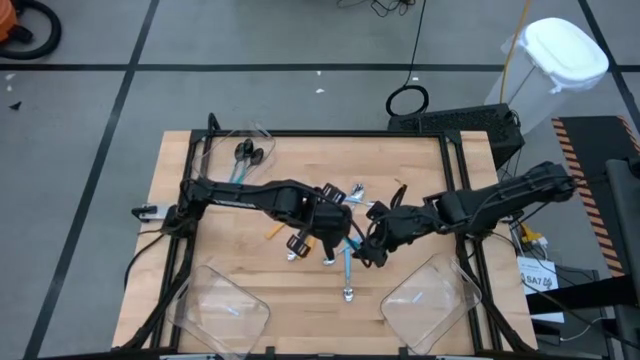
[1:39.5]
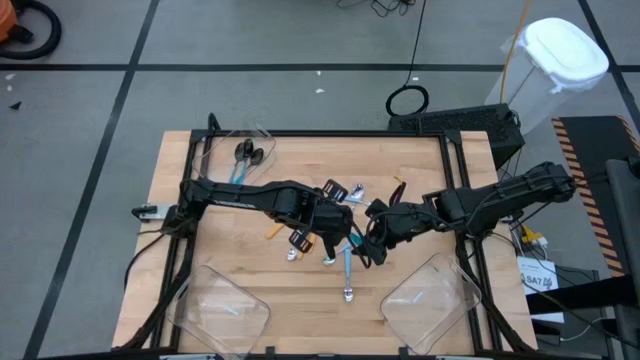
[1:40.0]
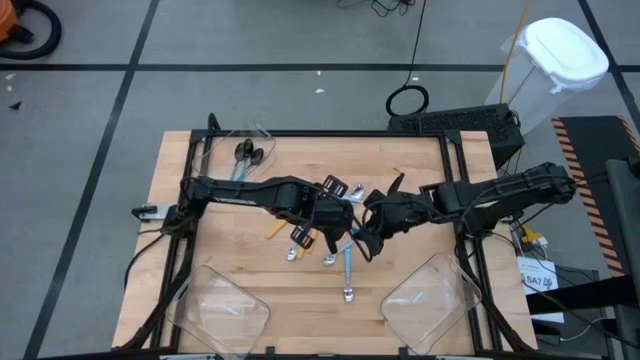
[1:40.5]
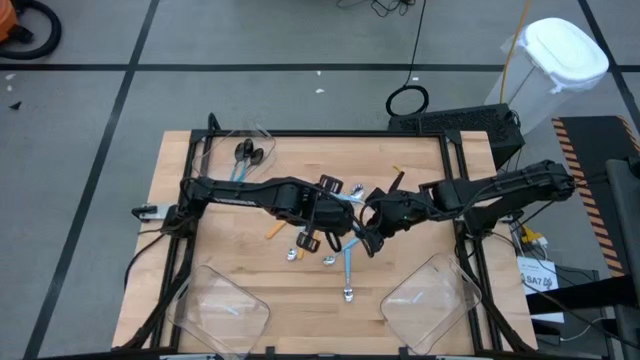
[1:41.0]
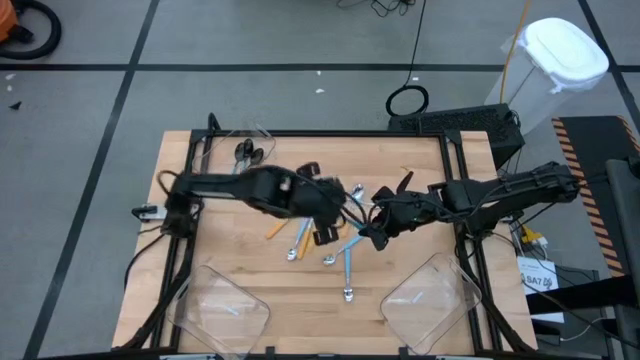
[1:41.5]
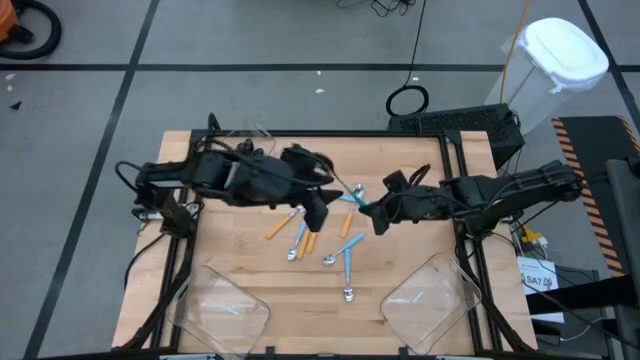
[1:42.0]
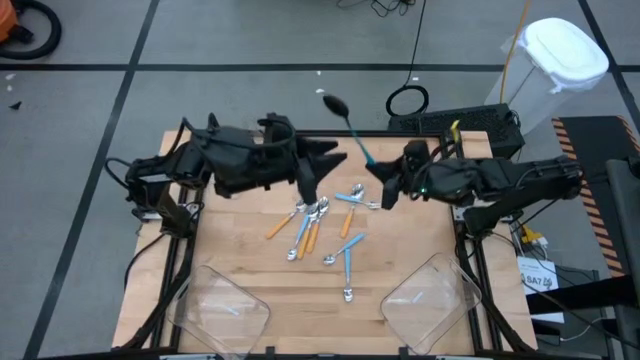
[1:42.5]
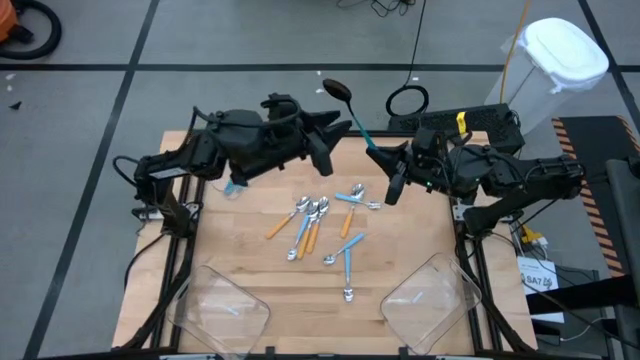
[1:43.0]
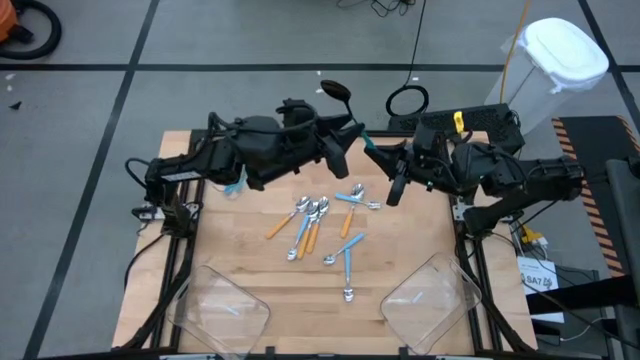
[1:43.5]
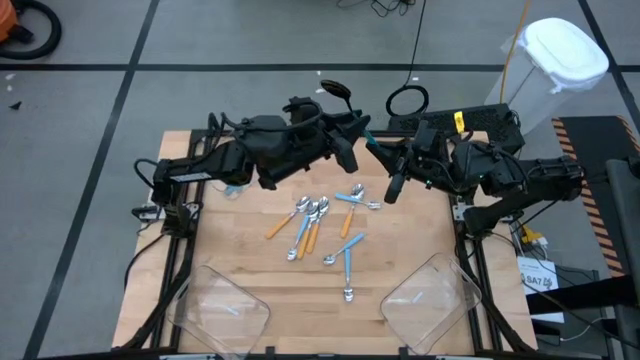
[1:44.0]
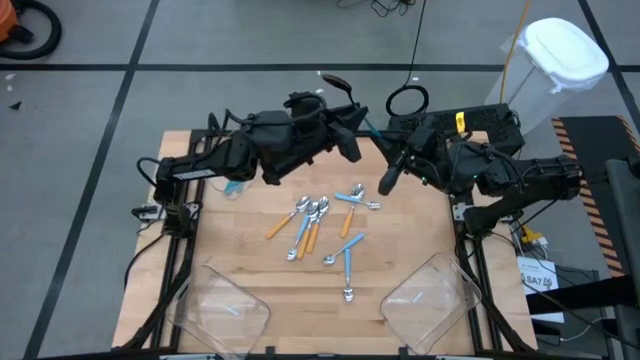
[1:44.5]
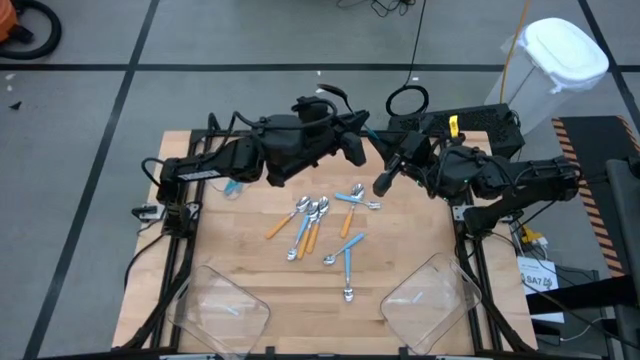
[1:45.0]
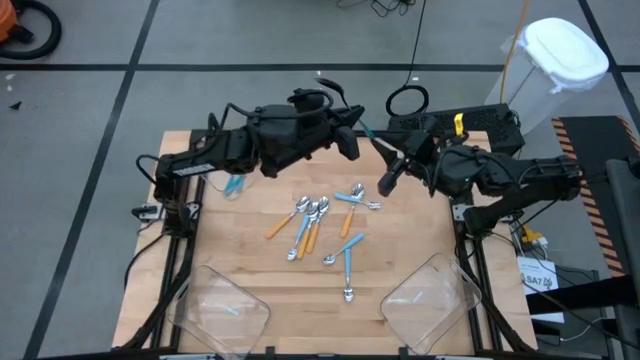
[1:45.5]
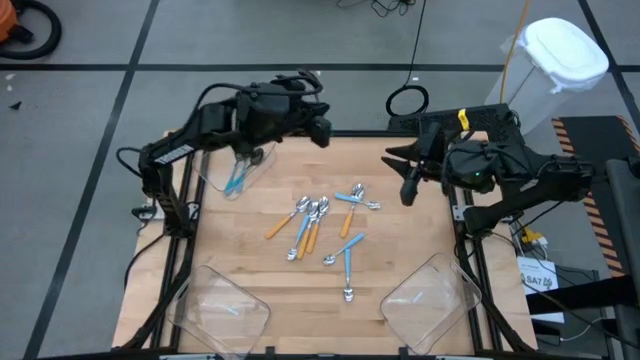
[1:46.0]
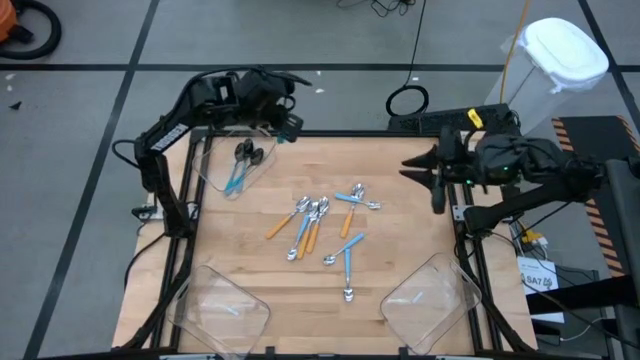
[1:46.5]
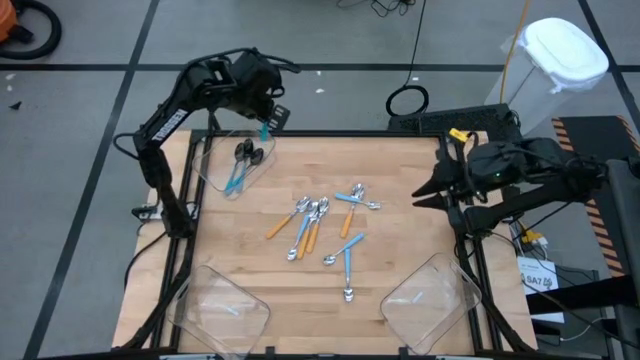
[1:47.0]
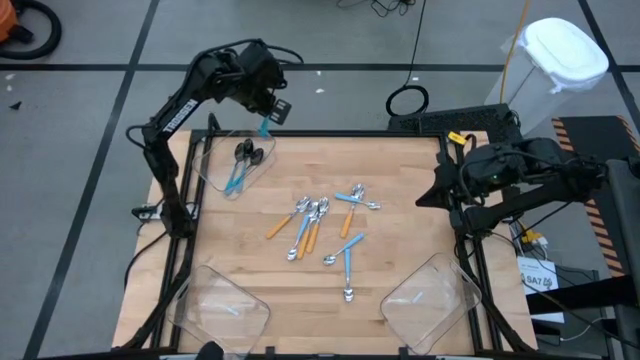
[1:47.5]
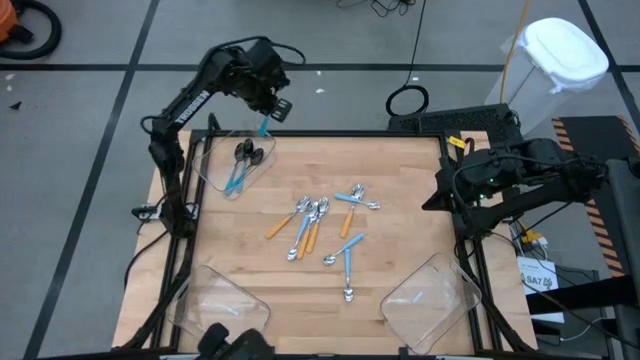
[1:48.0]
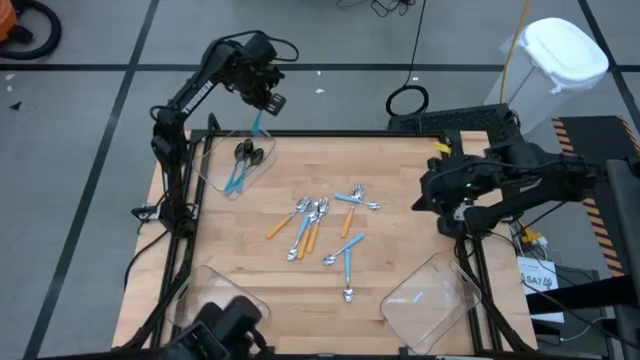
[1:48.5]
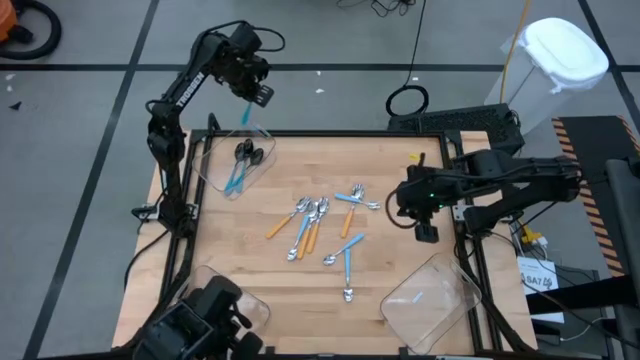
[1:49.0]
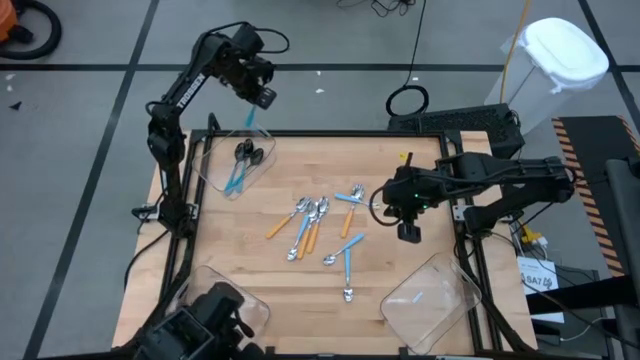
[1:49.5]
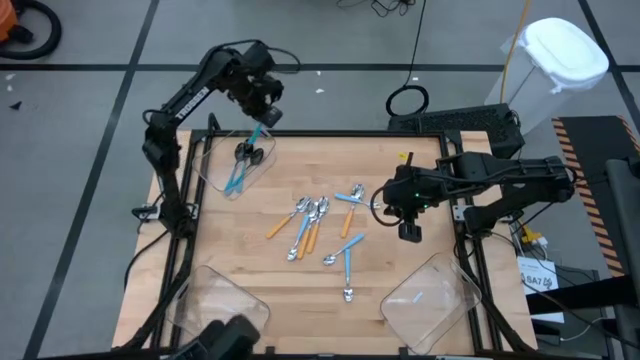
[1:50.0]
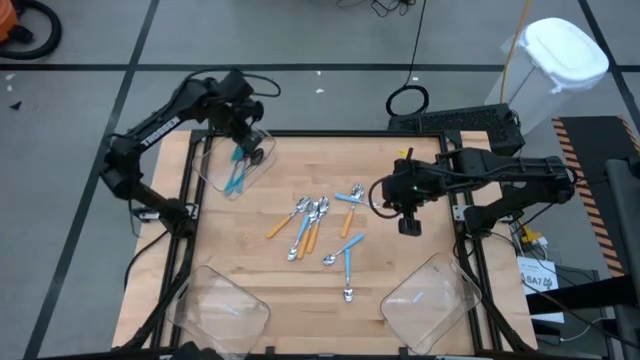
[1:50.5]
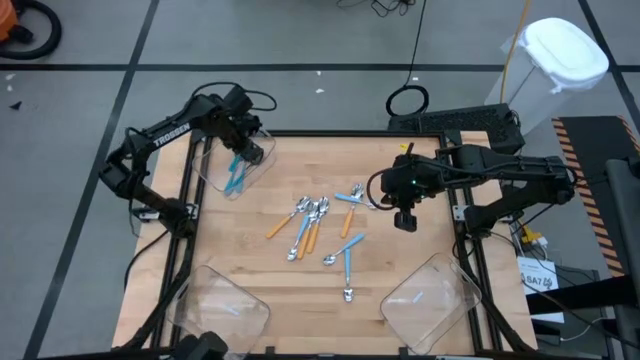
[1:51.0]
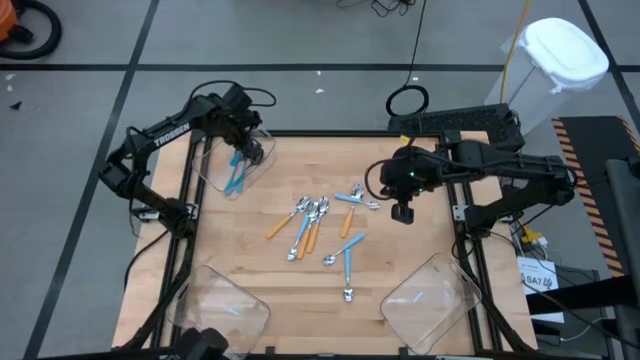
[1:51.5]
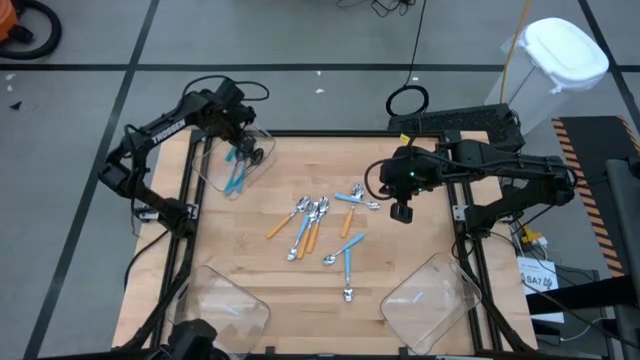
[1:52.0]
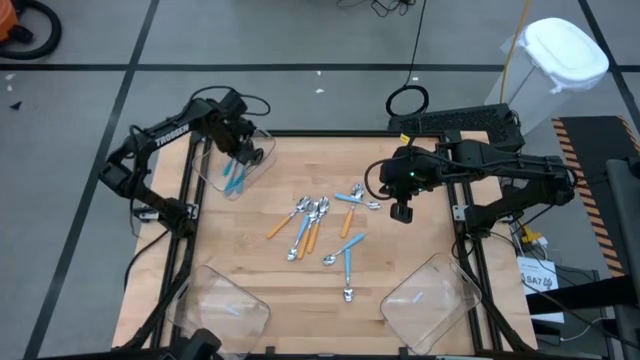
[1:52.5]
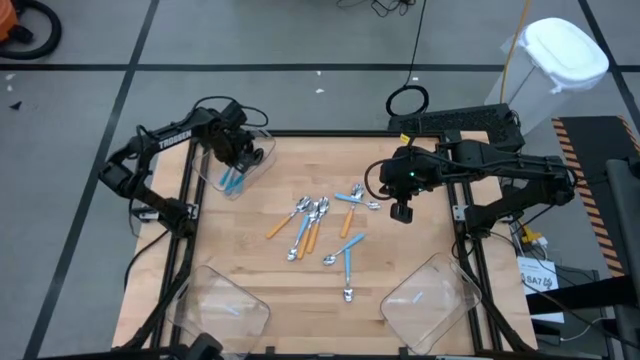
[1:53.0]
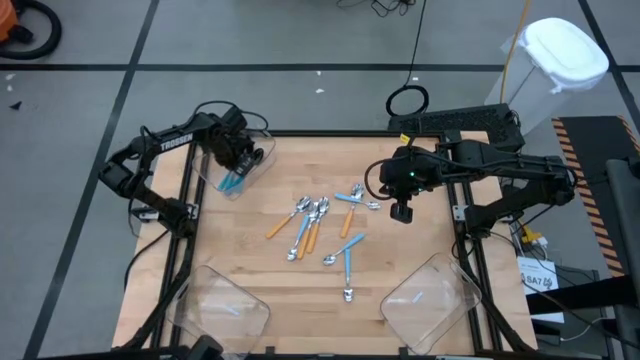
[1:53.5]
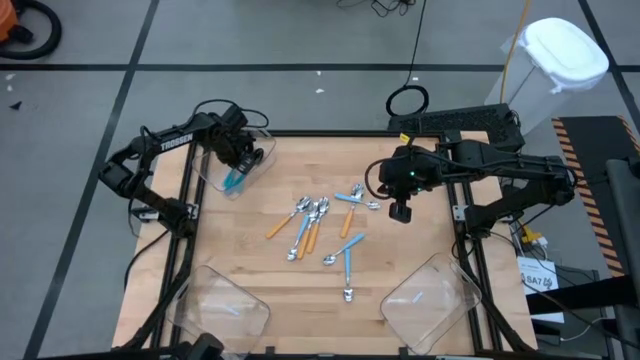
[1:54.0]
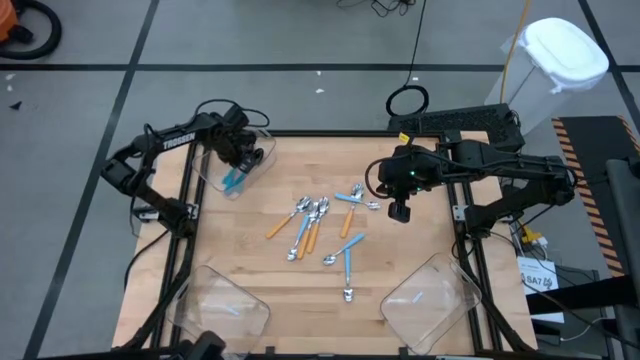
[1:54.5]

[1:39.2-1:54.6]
Task: Sort silverware by color (type)
Put the blue spoon into the top left transparent bin
